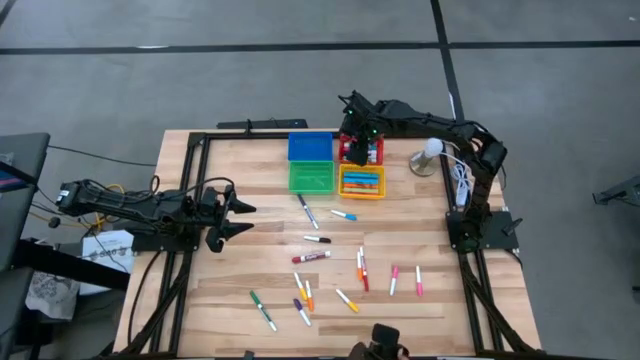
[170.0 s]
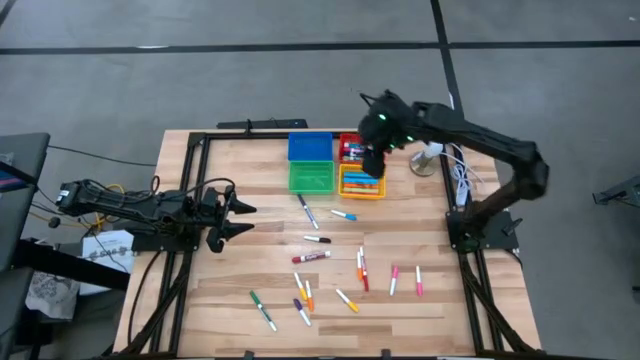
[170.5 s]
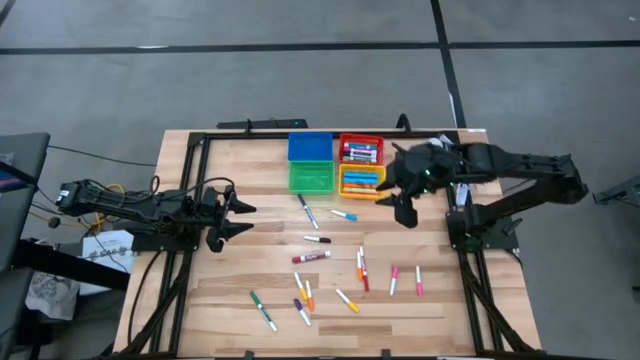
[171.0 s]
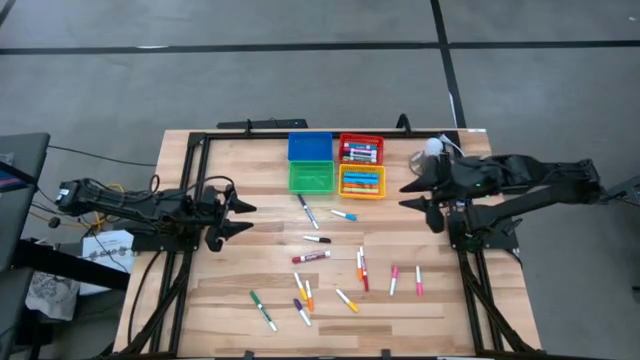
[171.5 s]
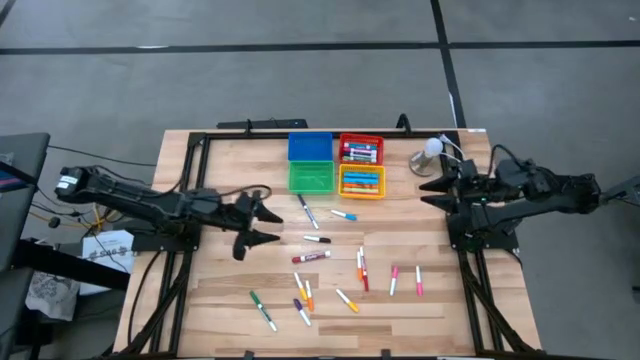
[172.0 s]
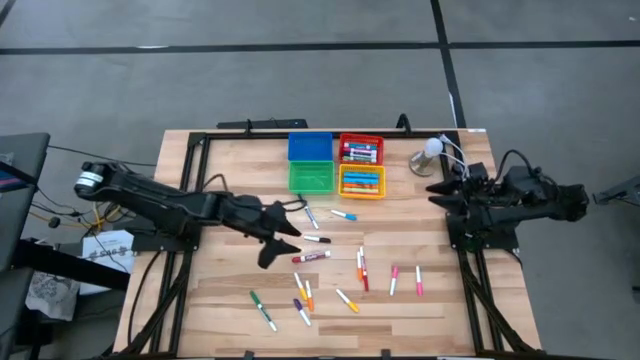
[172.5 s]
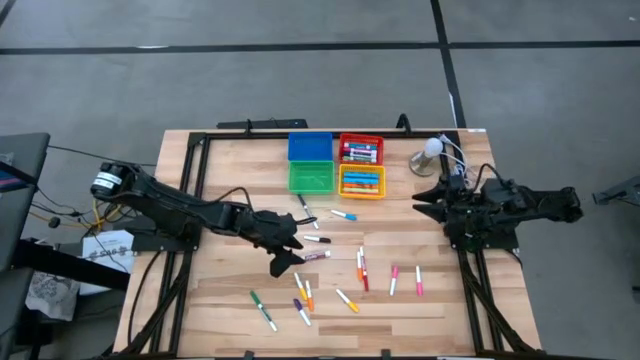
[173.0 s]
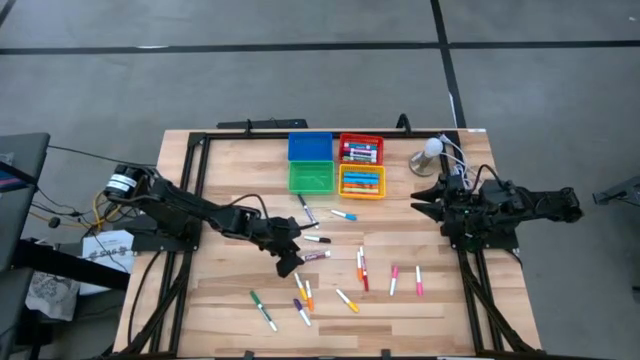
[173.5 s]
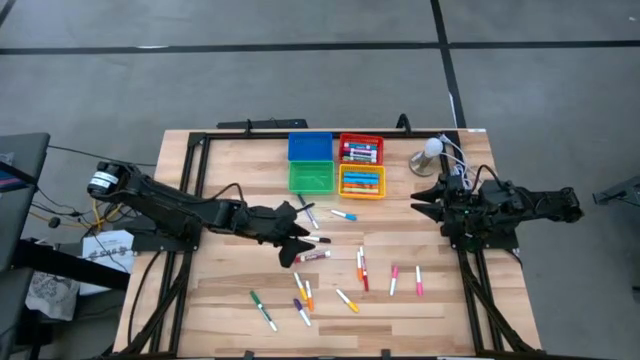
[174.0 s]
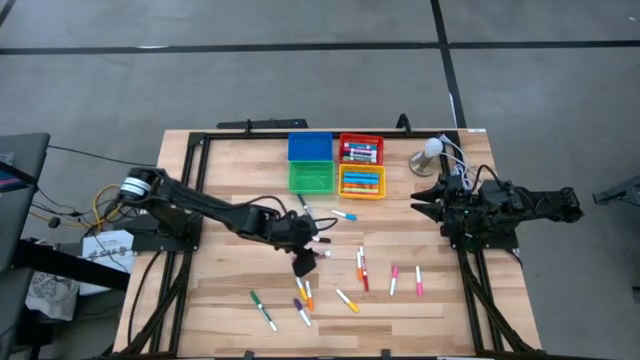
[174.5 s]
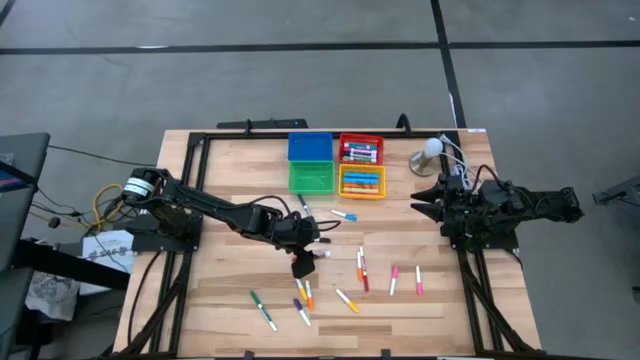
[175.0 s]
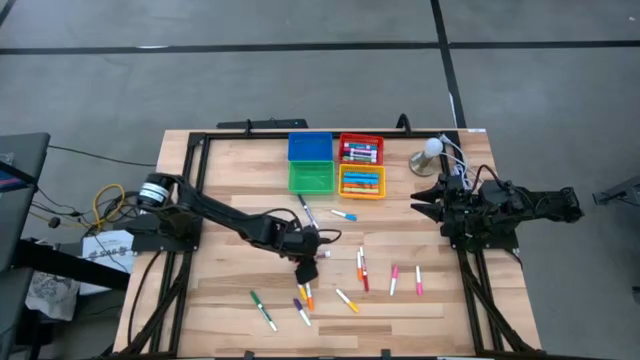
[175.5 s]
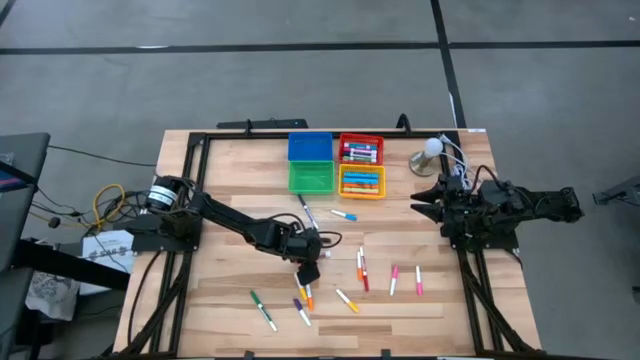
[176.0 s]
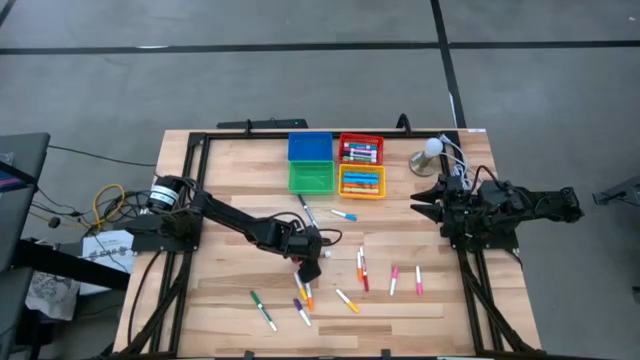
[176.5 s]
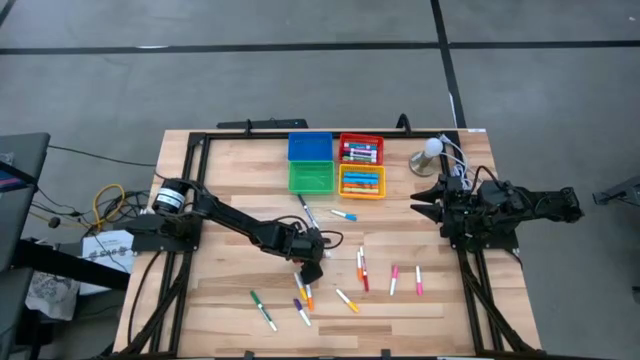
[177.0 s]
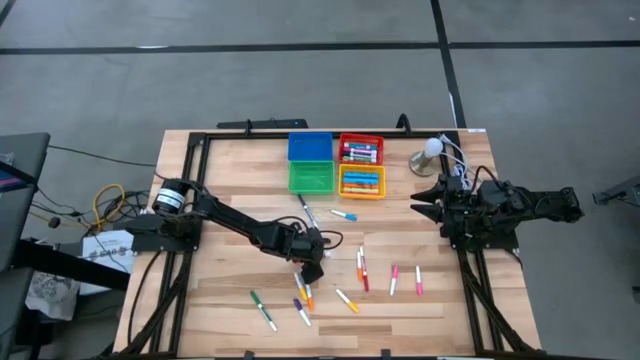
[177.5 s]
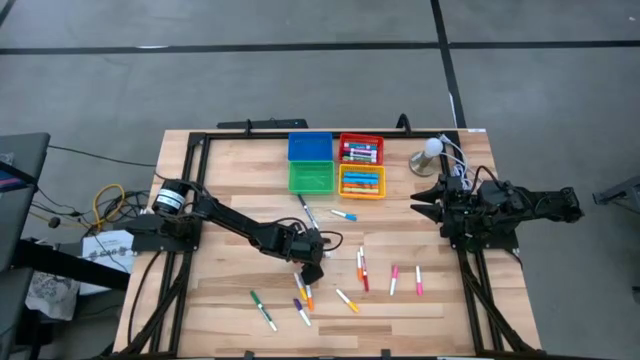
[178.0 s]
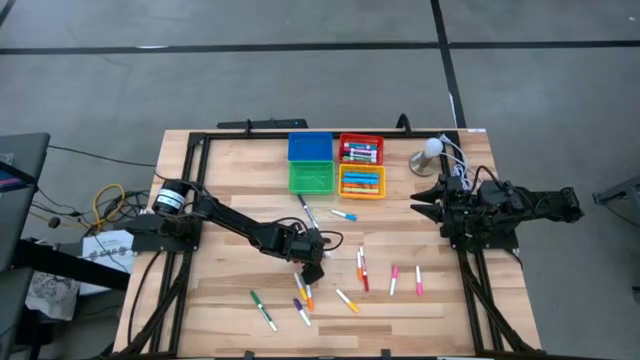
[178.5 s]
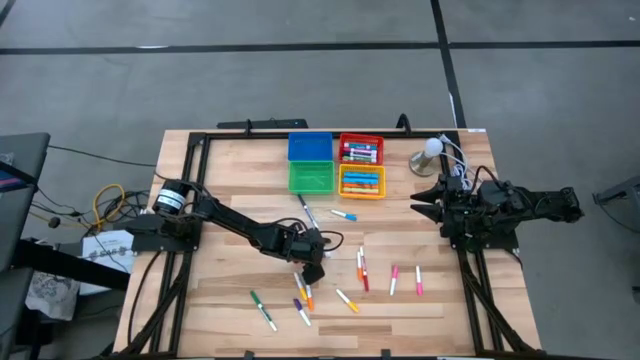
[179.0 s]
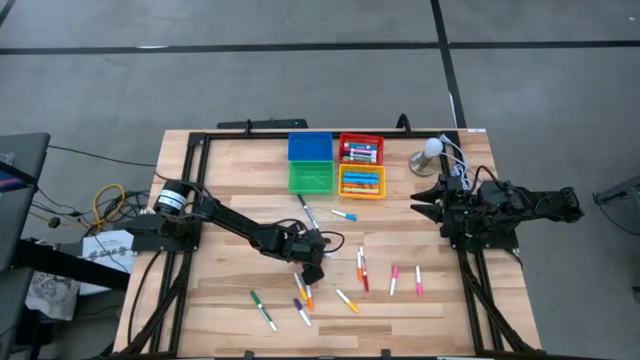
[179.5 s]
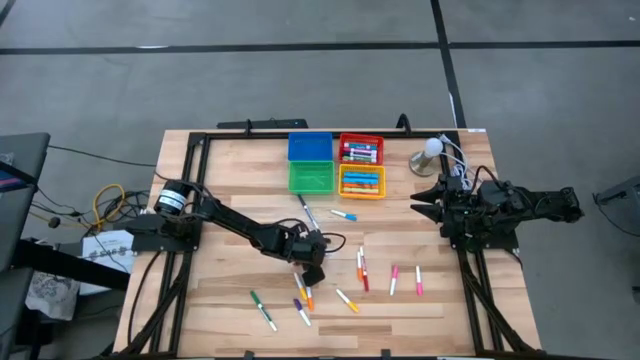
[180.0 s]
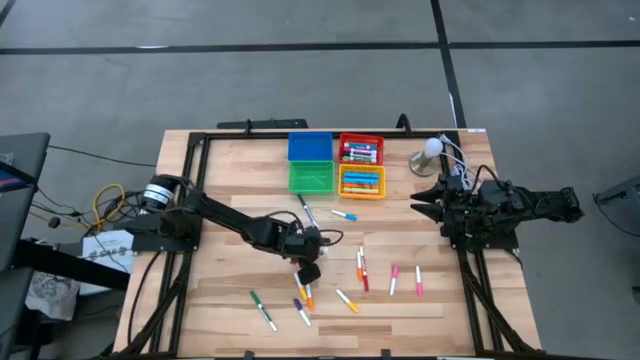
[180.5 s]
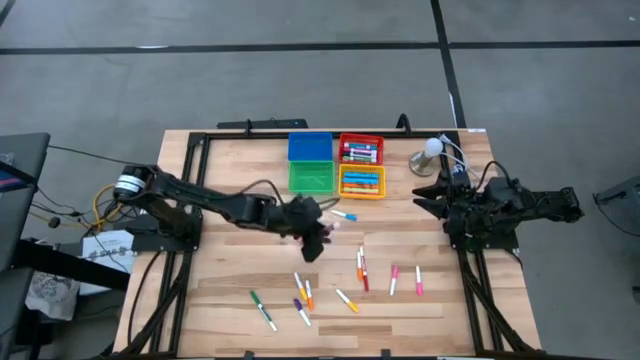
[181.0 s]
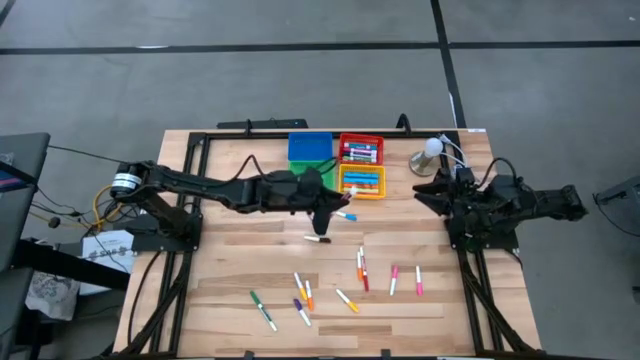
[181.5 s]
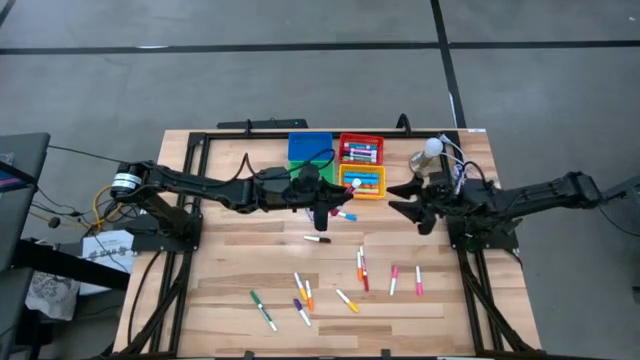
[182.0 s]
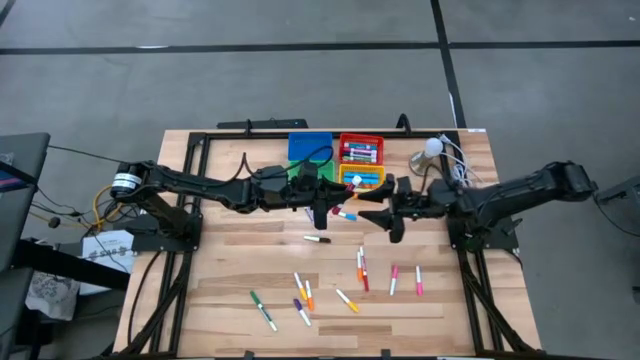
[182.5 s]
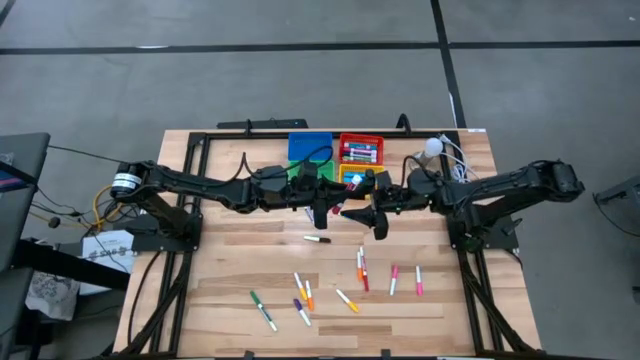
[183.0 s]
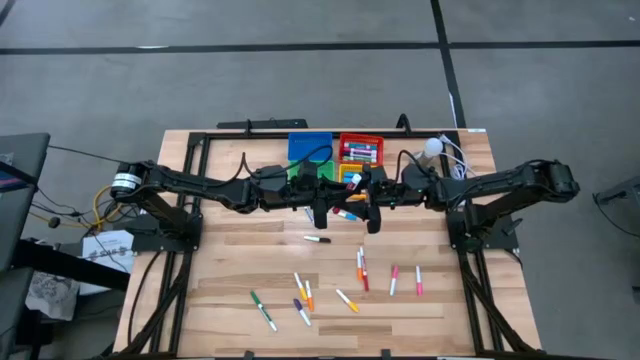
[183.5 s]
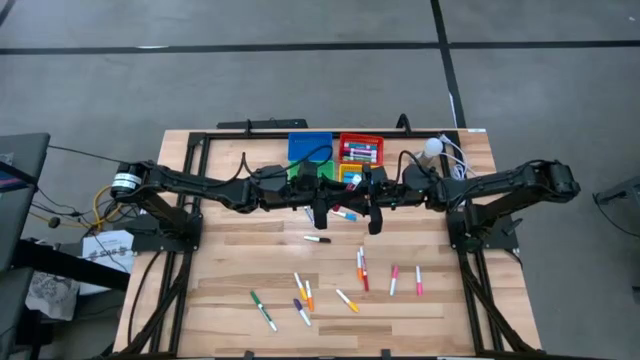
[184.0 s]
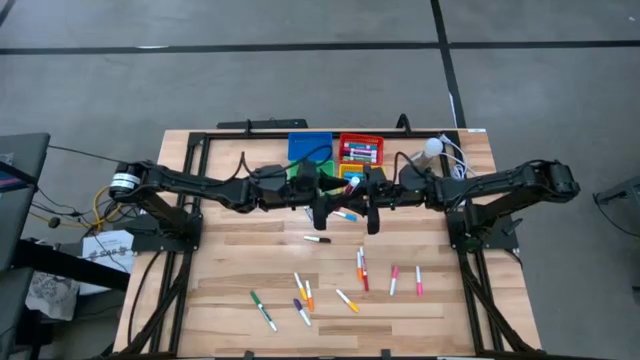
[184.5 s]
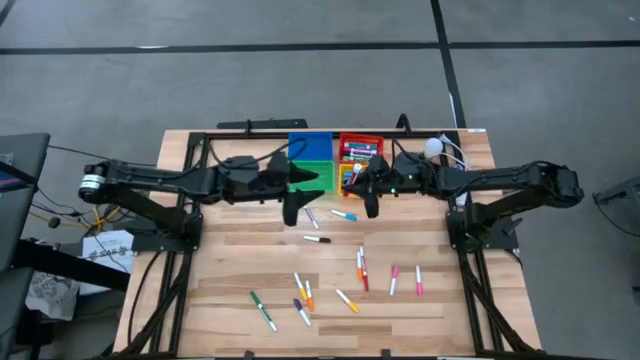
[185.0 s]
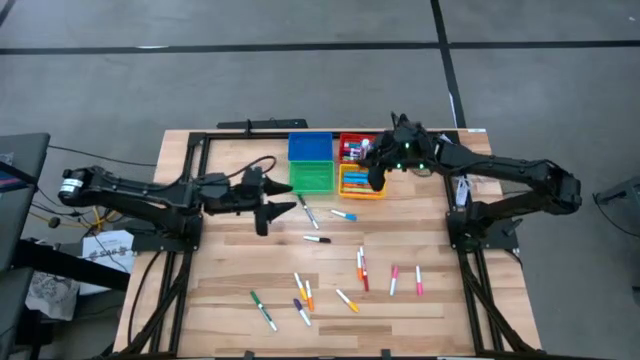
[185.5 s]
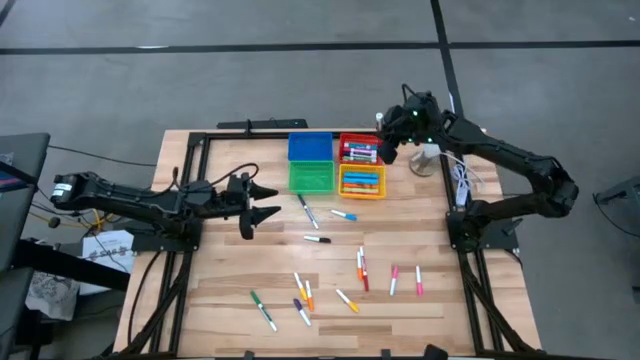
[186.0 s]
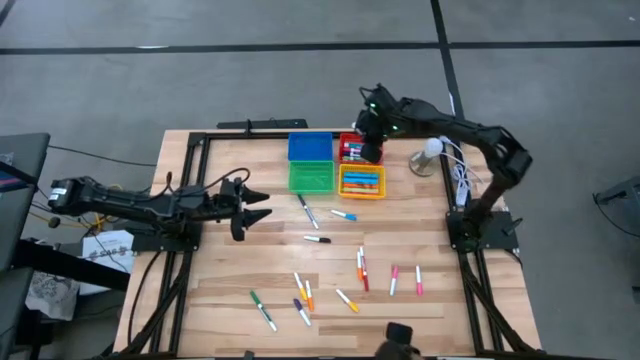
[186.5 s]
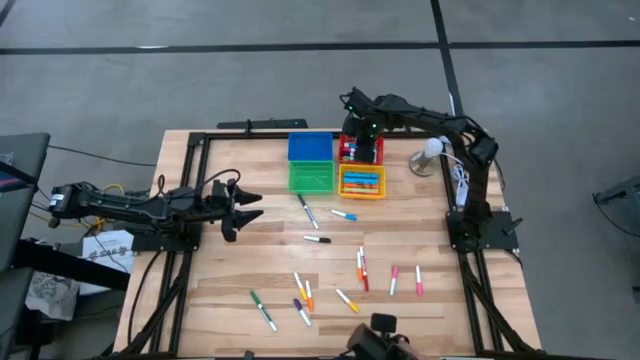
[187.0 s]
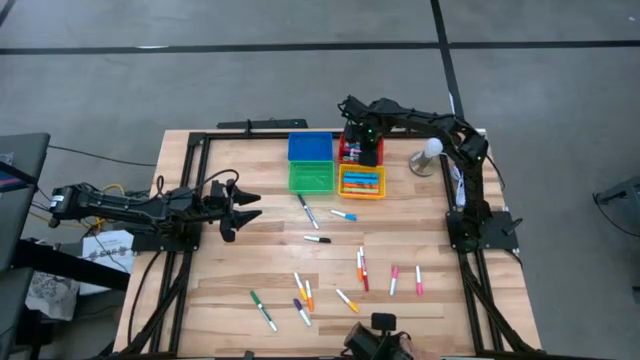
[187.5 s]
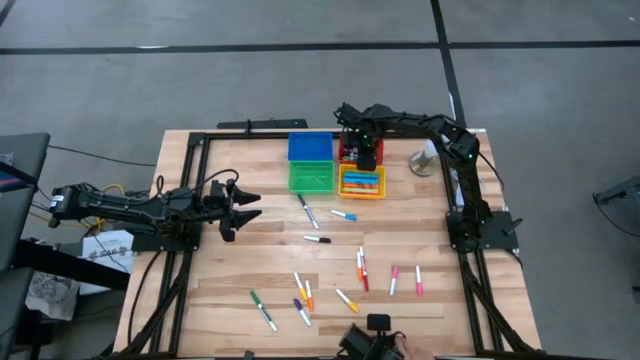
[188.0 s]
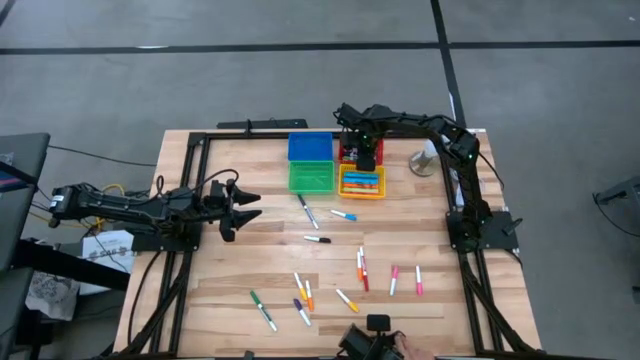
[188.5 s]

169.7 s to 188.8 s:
Task: Pick & Place Markers
Put the large red marker pen into the red bin
